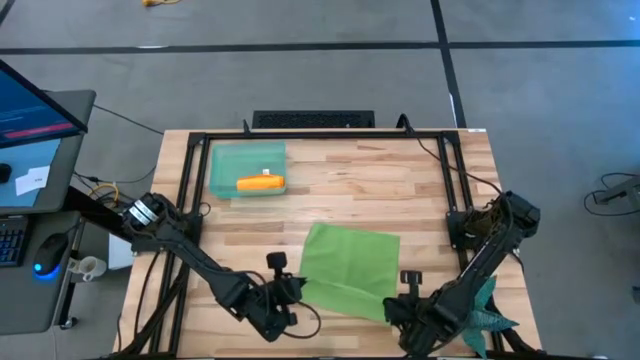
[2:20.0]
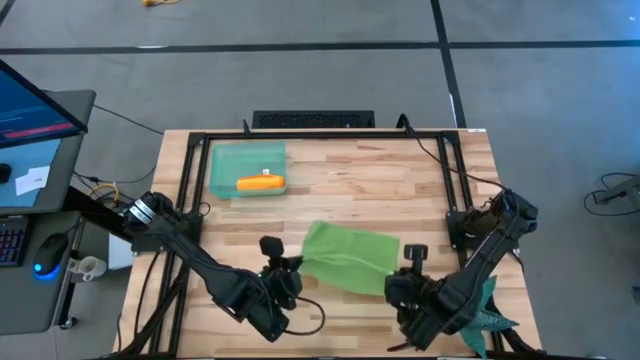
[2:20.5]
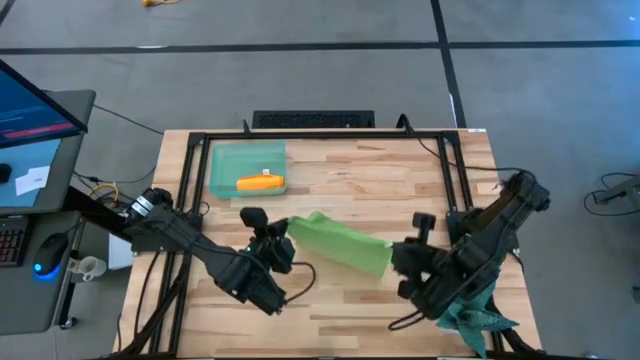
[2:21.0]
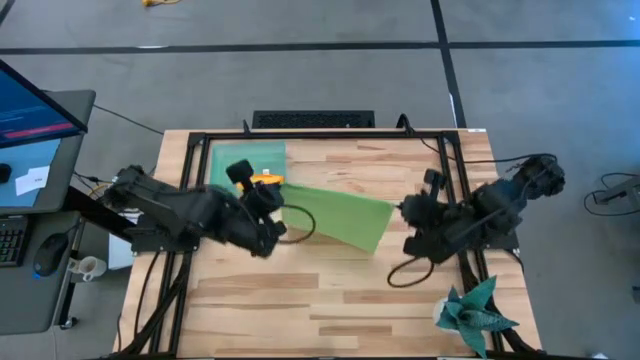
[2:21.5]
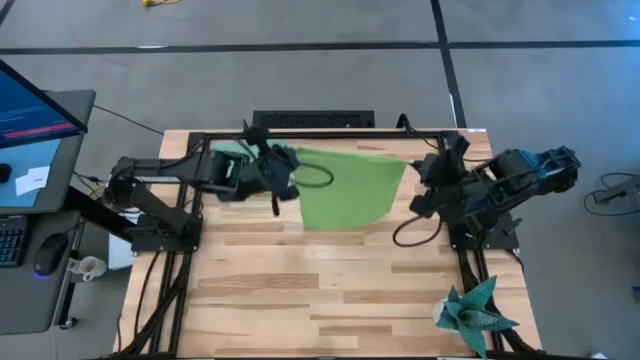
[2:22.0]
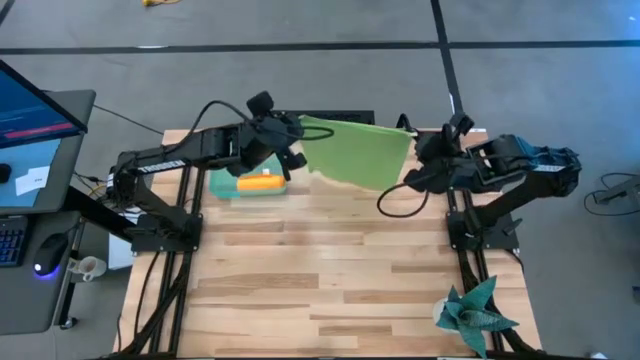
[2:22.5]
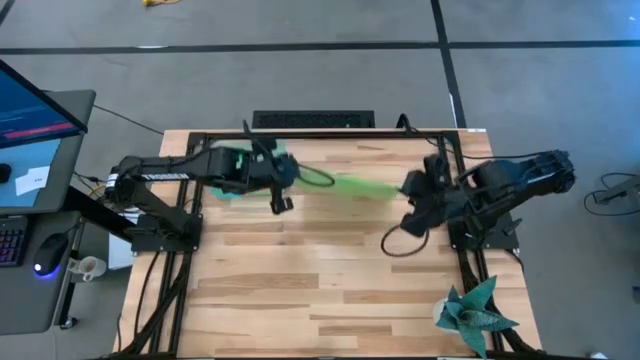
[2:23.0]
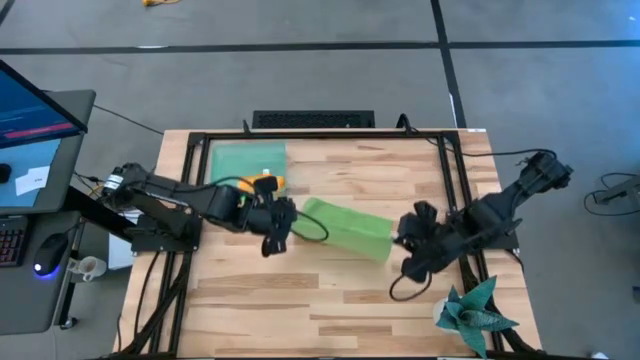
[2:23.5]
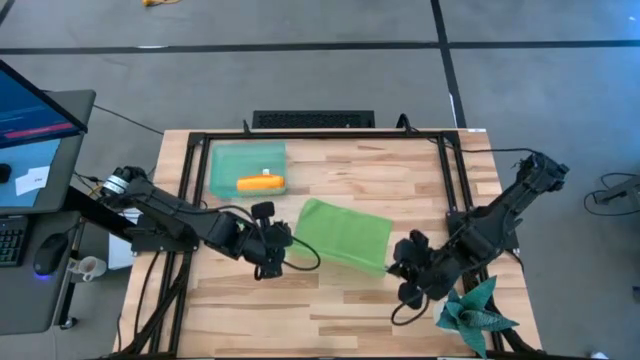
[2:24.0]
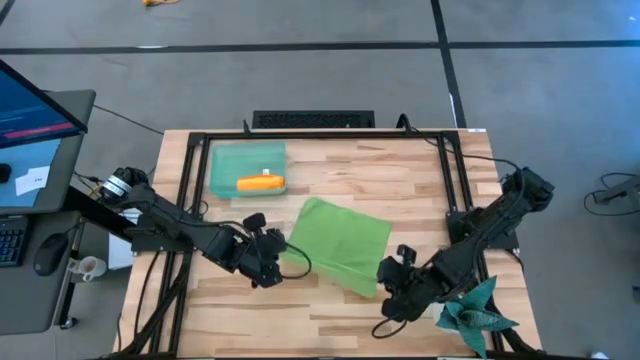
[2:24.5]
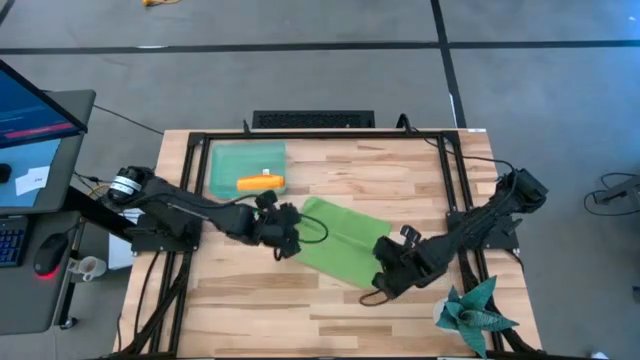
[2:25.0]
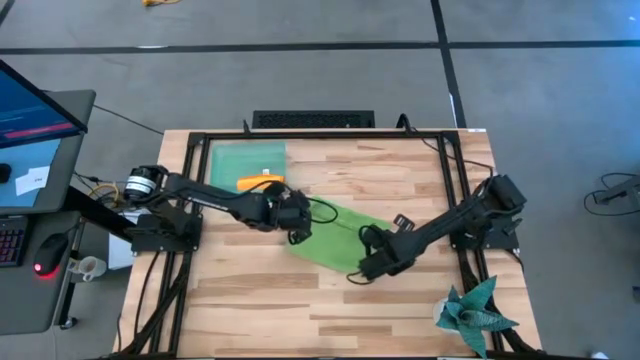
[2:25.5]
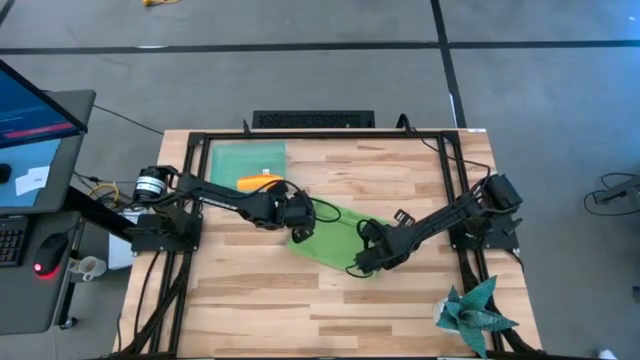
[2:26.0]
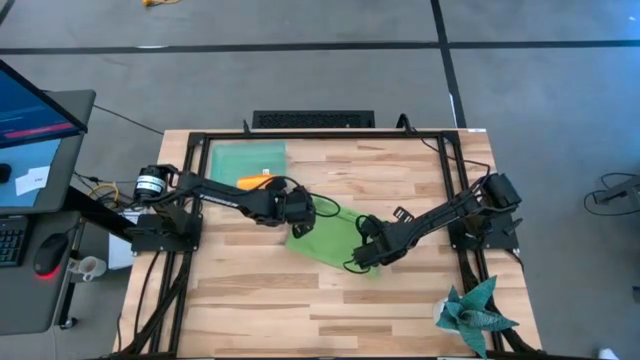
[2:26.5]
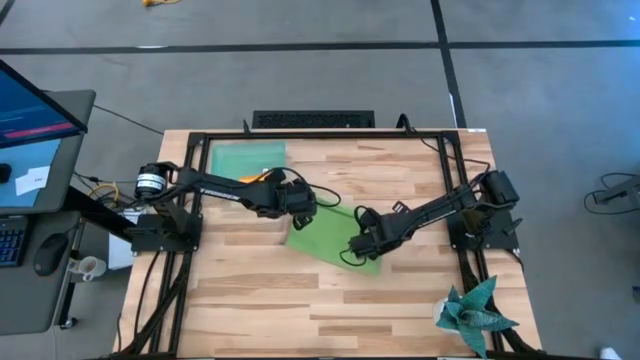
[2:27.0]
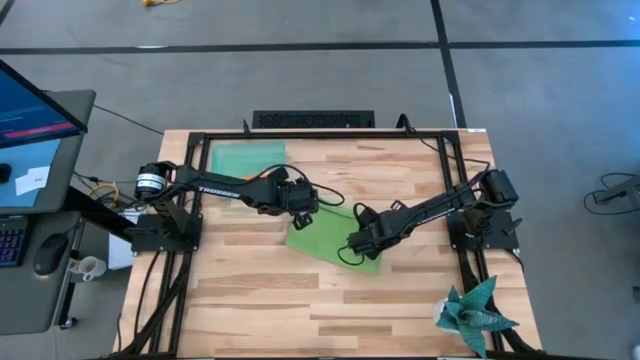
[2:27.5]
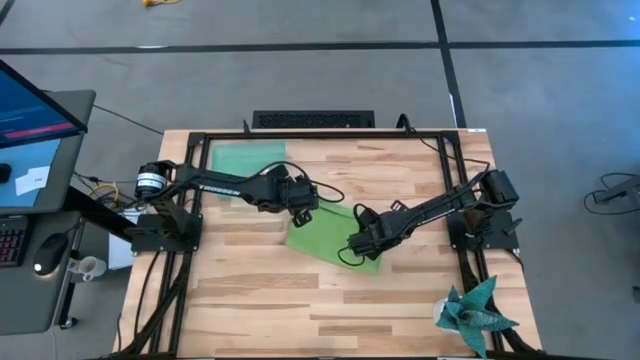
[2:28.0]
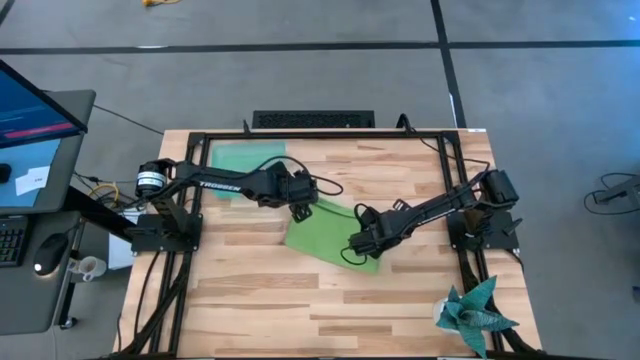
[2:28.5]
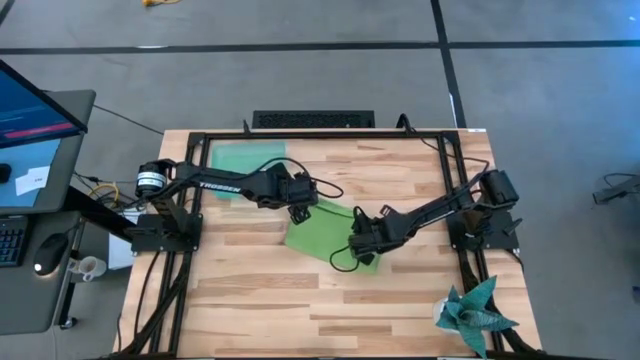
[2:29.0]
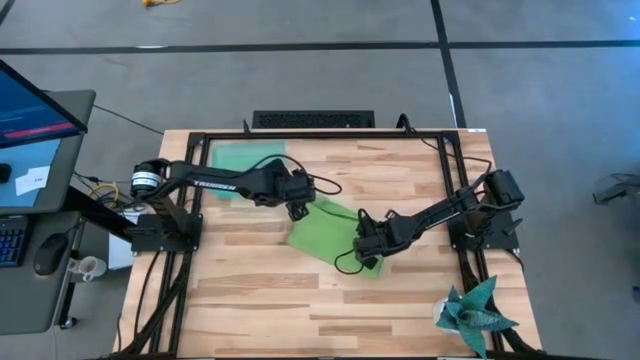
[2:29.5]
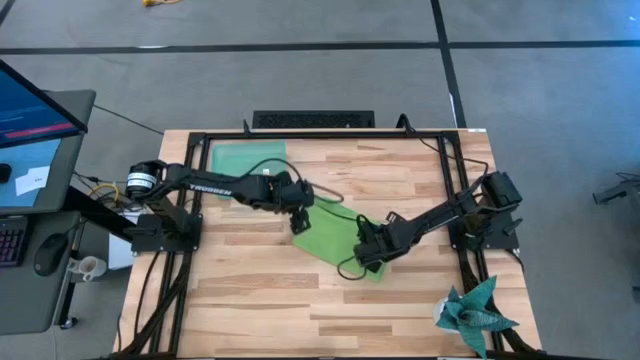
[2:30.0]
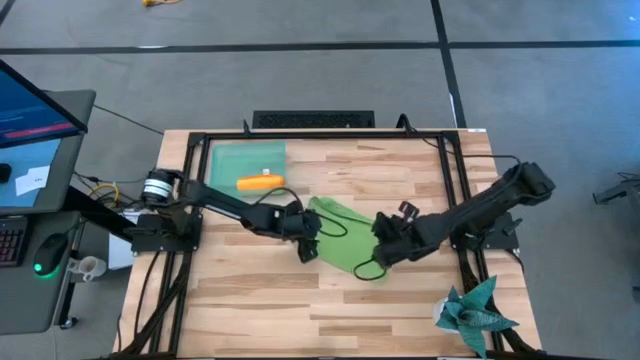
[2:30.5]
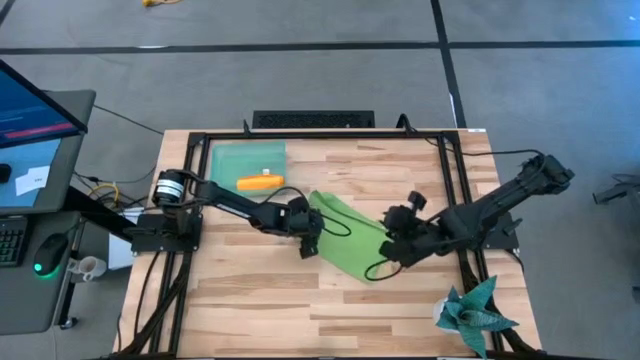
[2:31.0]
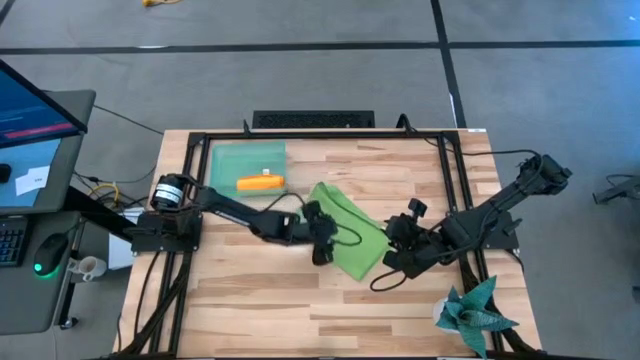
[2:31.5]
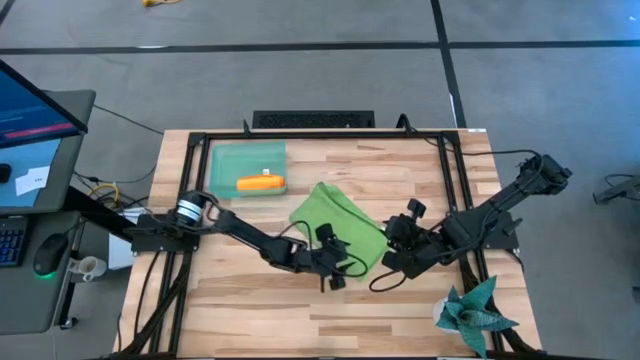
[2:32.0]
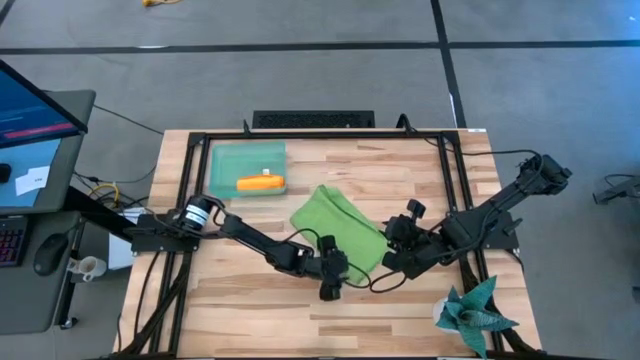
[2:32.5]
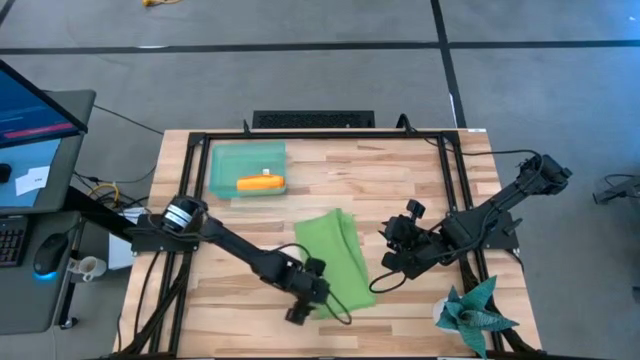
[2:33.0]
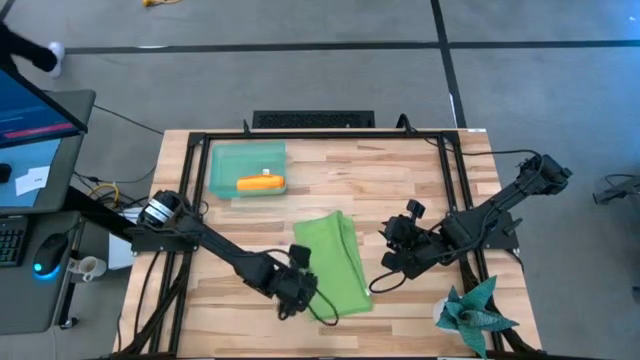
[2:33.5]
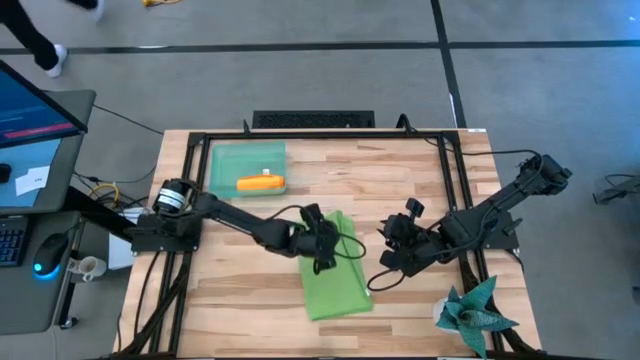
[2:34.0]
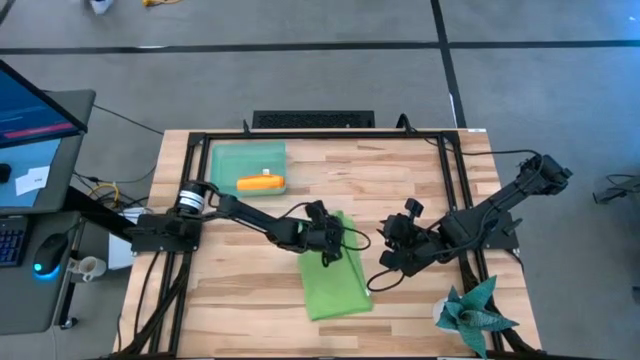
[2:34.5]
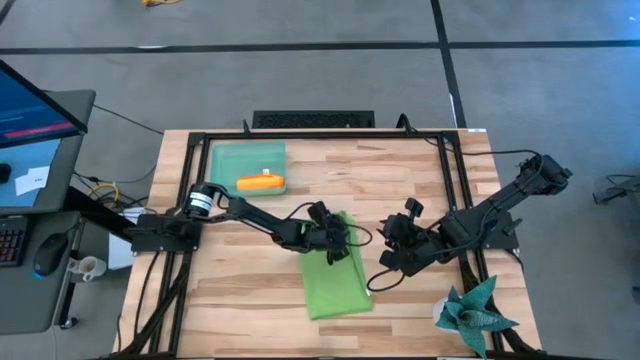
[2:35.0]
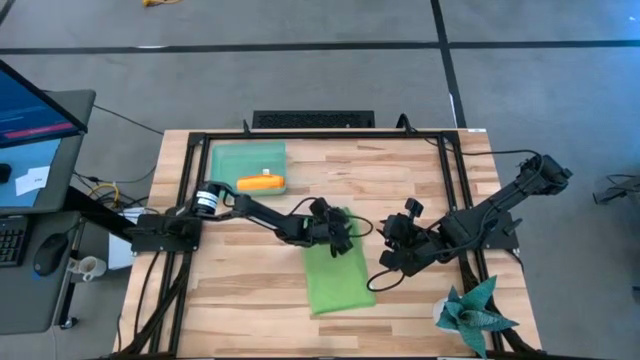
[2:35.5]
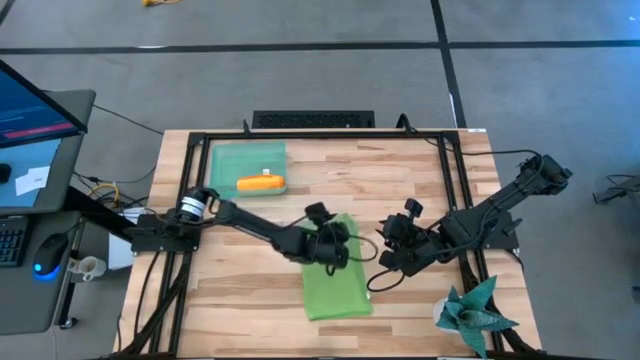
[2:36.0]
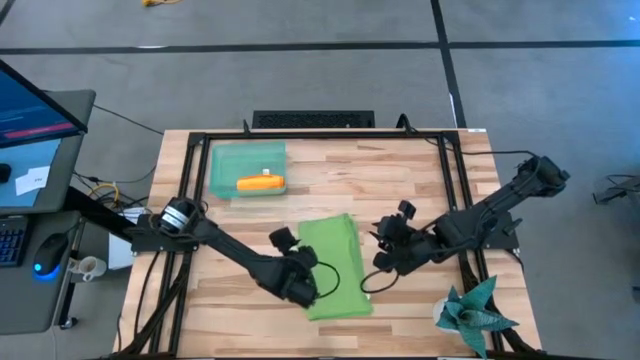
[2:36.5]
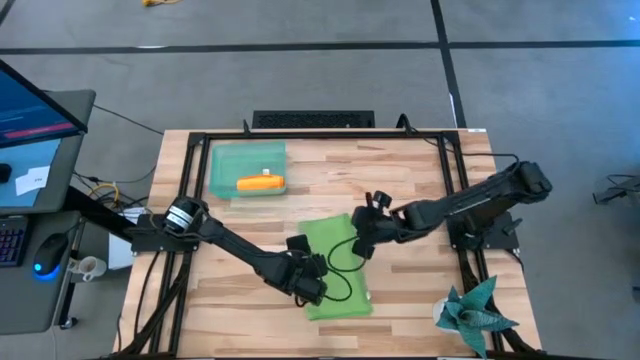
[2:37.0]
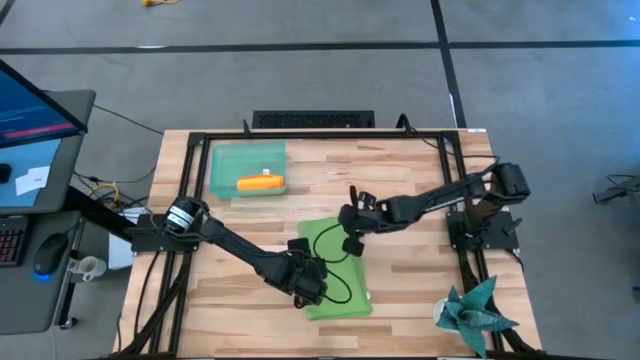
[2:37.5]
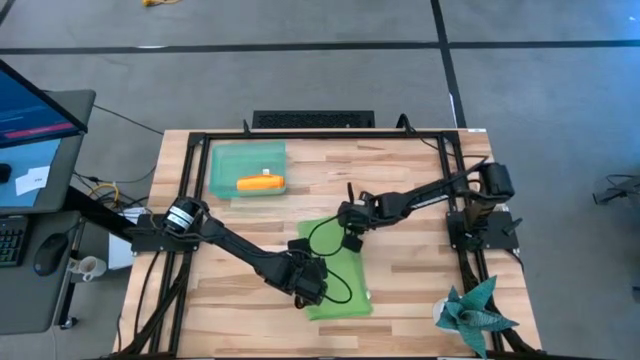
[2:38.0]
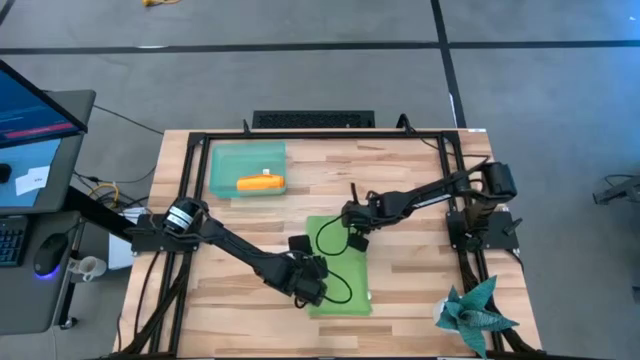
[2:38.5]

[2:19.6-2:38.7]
Task: Roll microfiber towels into tight, uniform cylinder then place into a basket
Roll the green microfiber cloth

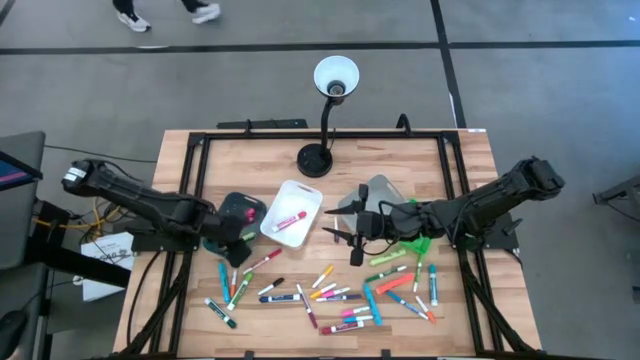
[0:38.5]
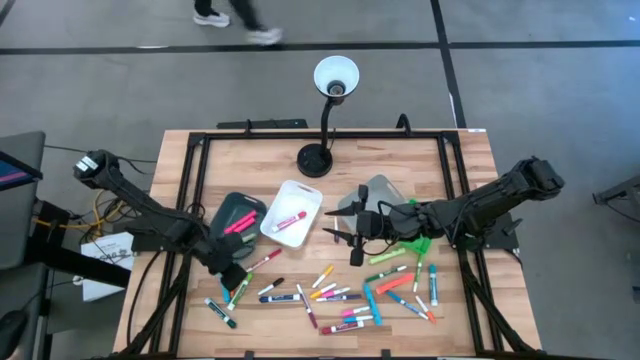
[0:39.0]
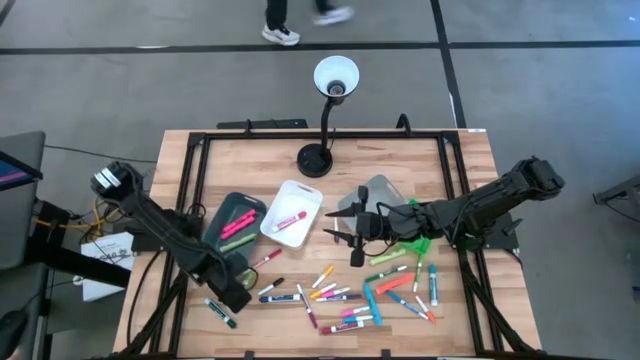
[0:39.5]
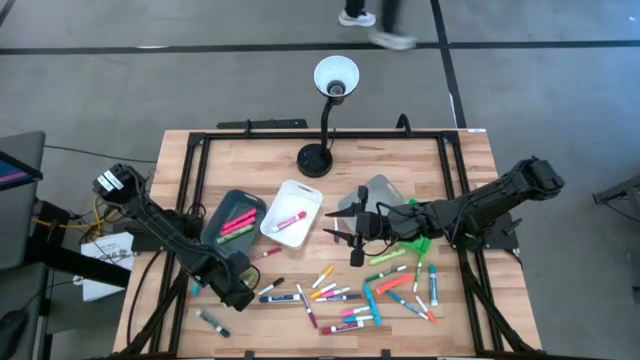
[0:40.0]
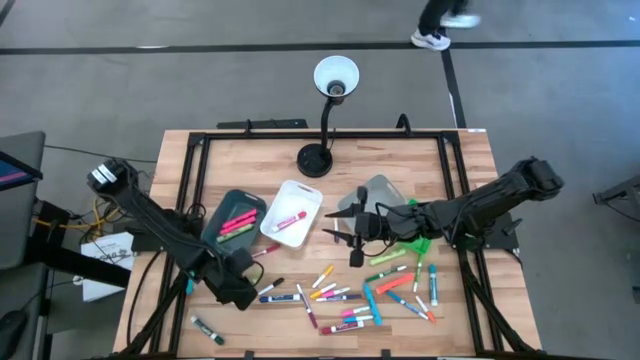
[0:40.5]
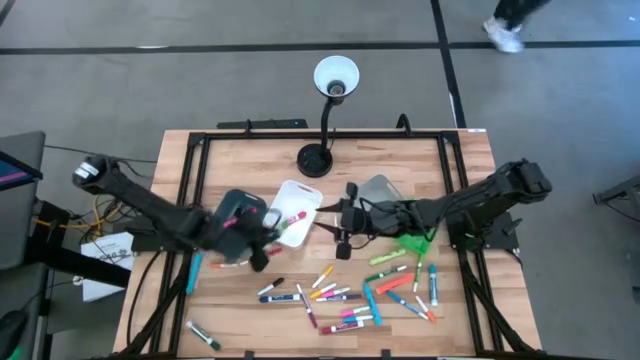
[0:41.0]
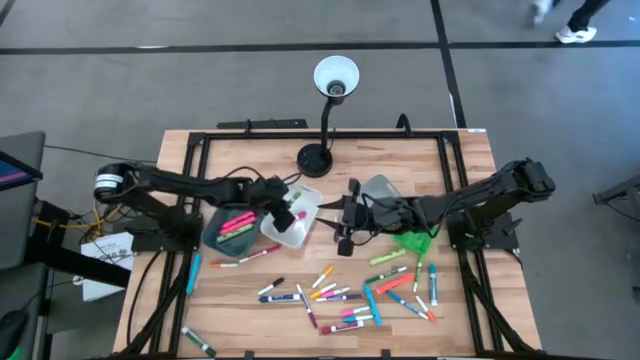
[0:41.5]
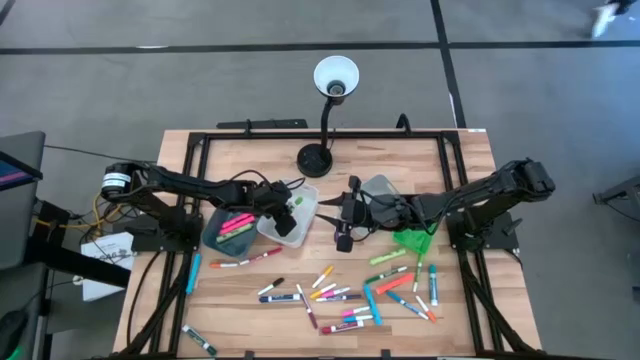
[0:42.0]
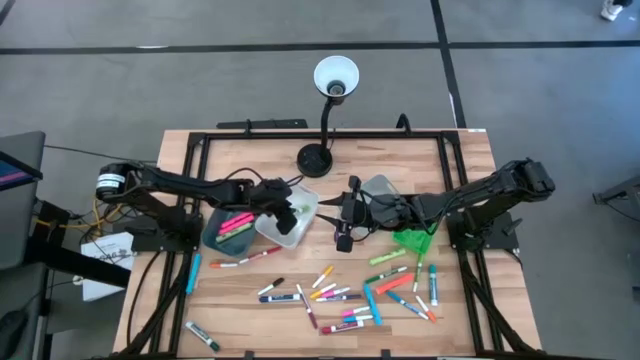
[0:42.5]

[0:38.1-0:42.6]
Task: Pick & Place Markers
Put the light green dry erase marker into the white bin
